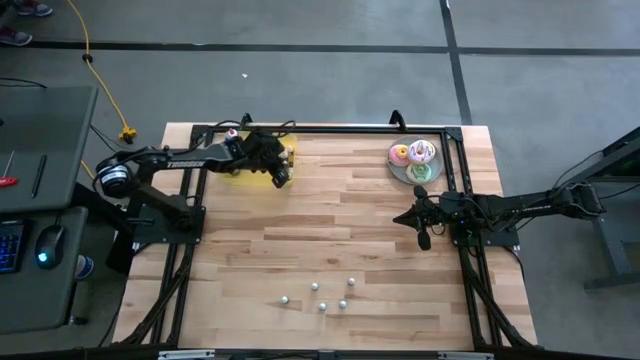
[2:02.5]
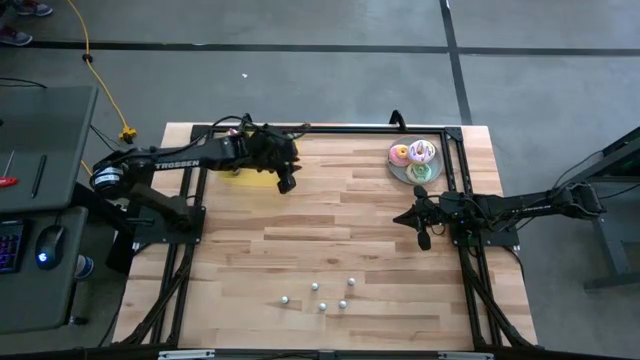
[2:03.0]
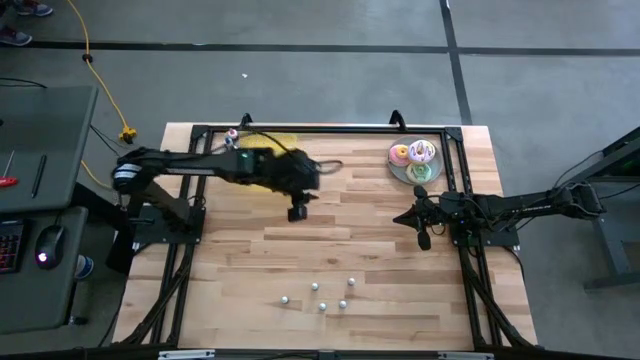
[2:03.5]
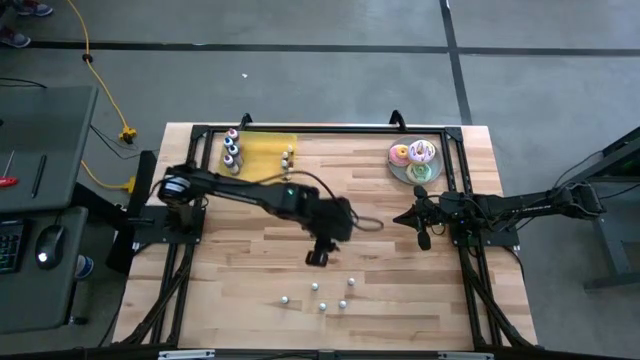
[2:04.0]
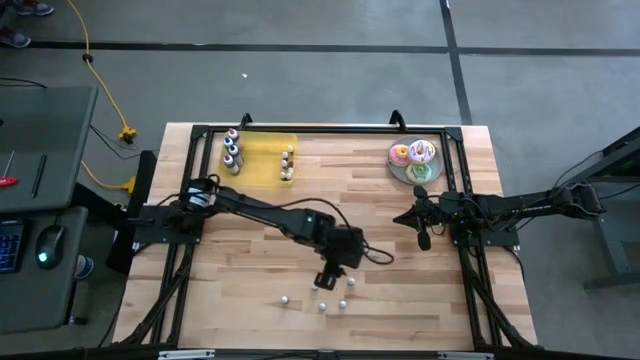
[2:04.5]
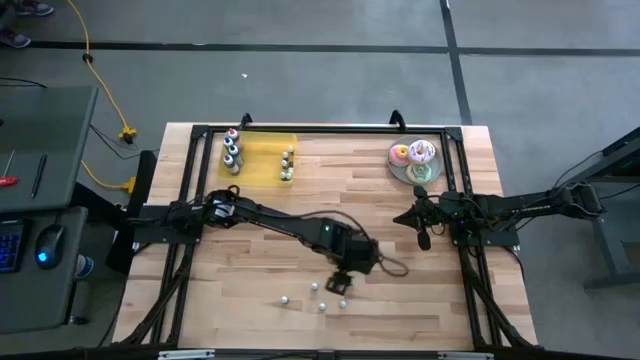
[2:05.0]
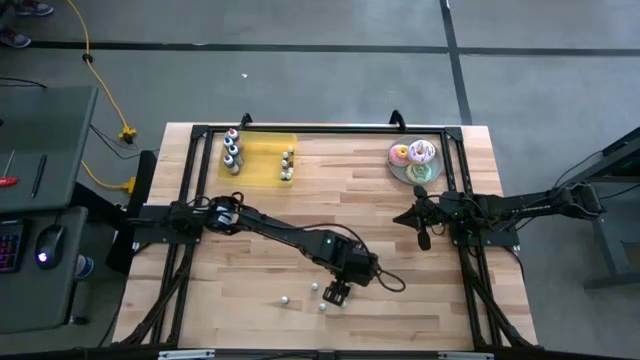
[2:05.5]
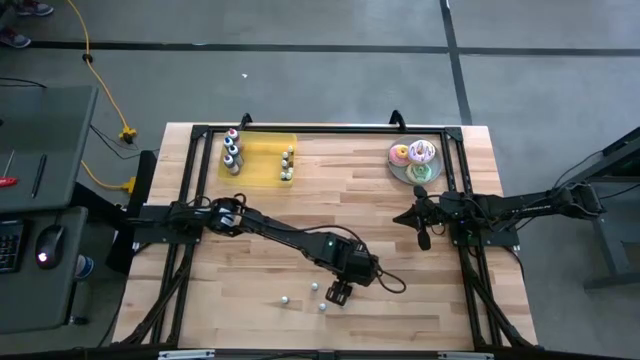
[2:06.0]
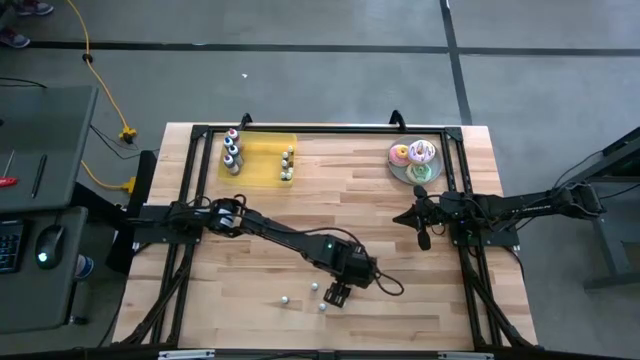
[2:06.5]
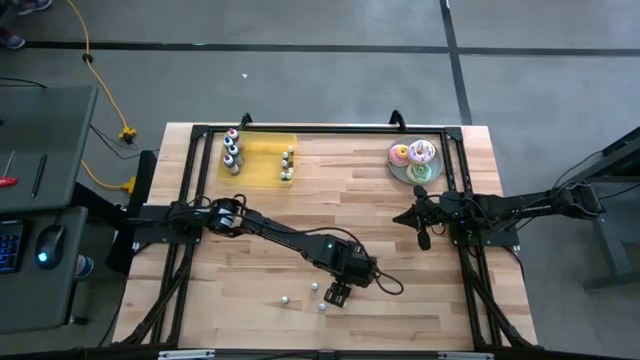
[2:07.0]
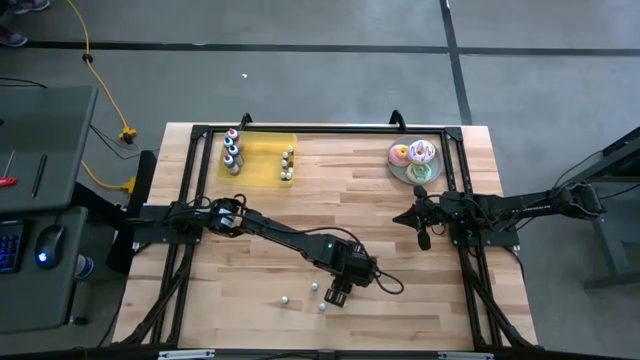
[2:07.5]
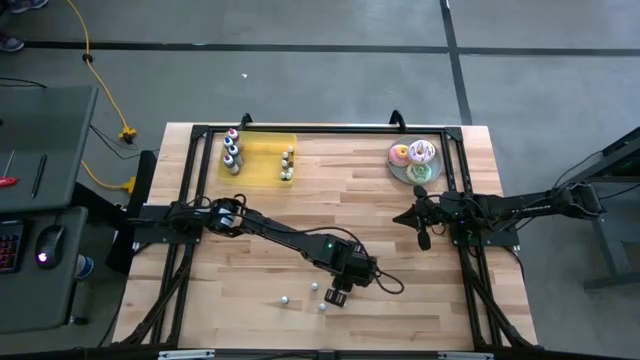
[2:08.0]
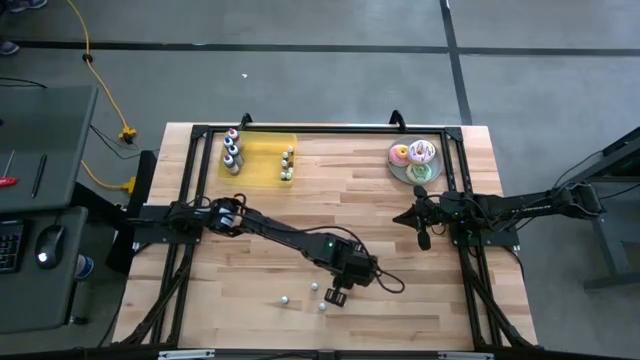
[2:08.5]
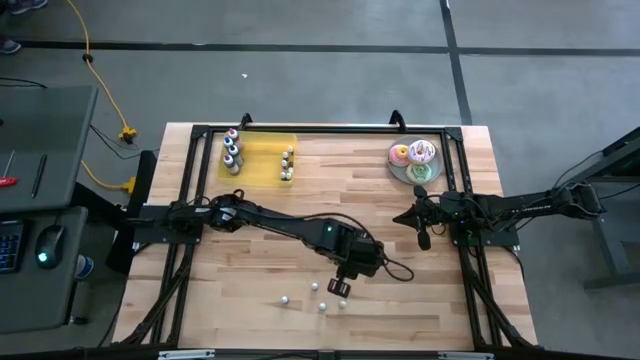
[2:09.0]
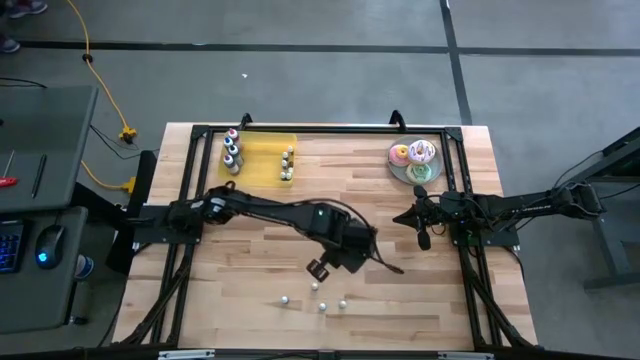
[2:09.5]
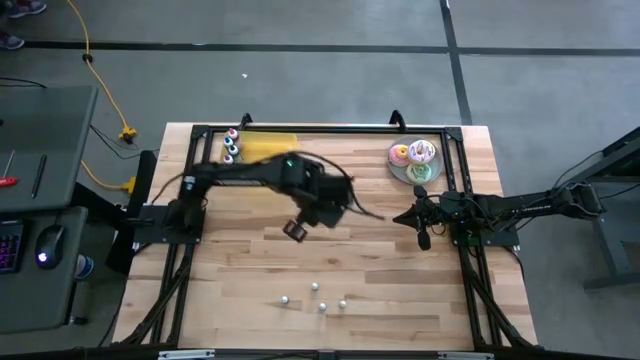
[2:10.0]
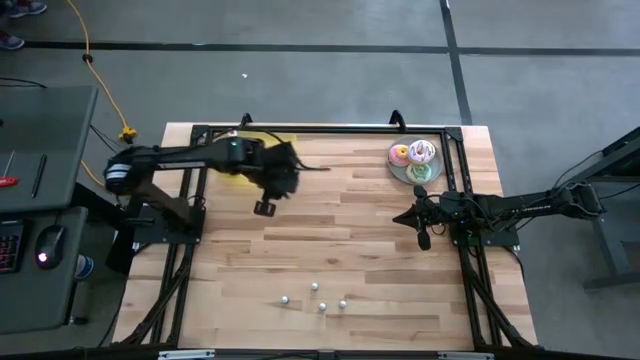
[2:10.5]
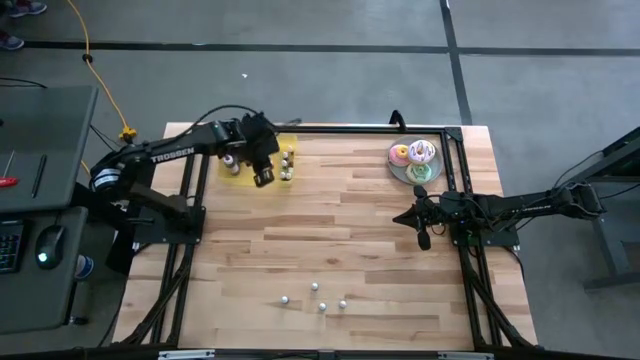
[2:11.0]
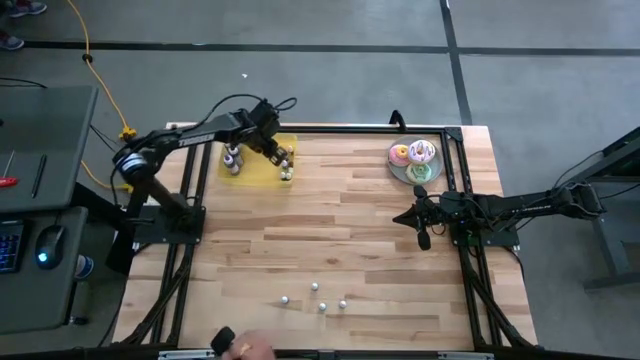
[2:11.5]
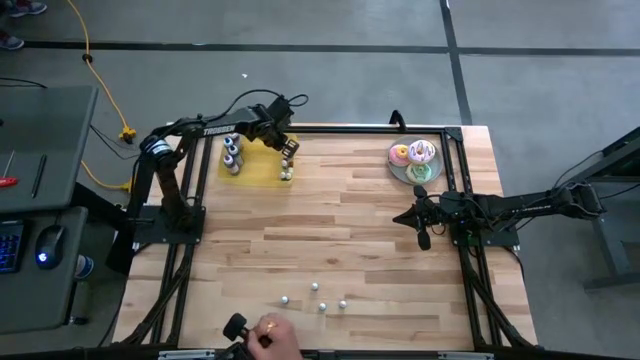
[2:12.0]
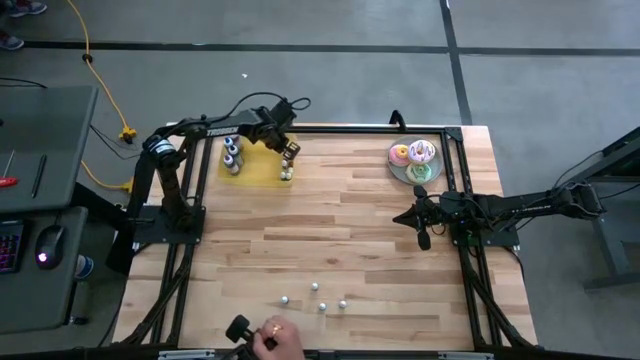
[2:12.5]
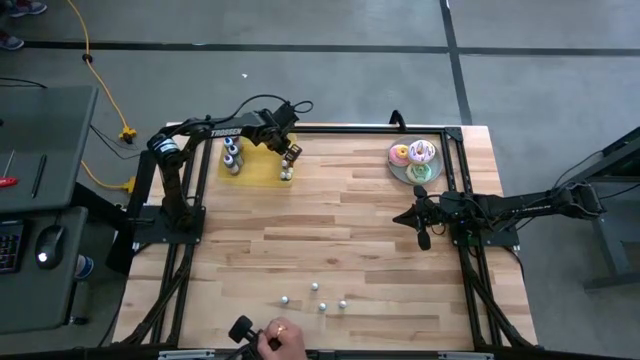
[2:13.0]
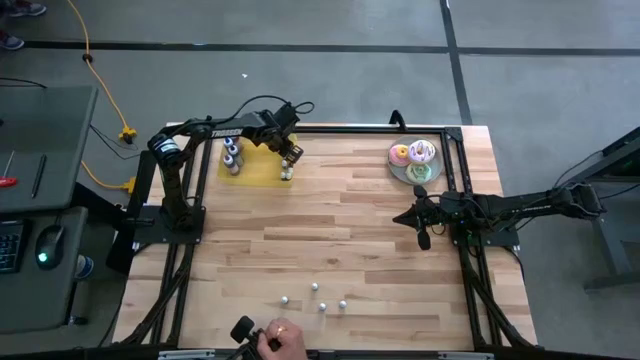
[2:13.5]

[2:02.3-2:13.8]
Task: Pick & Place food coloring
Put the small orange food coloring bottle into the yellow bin

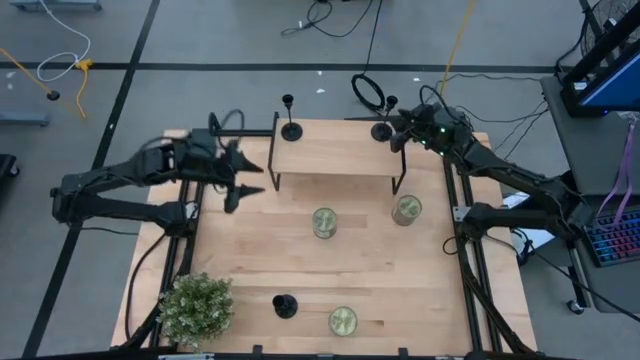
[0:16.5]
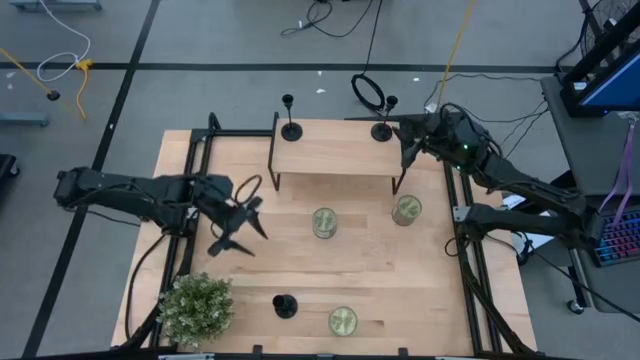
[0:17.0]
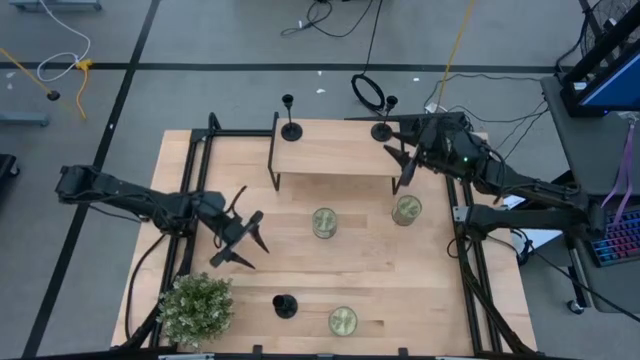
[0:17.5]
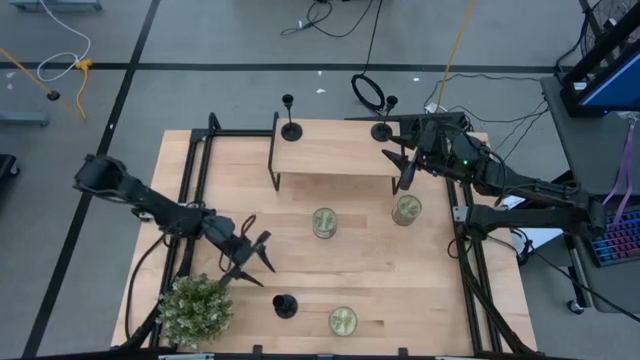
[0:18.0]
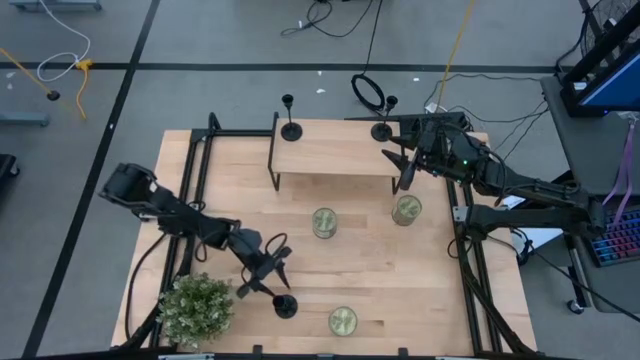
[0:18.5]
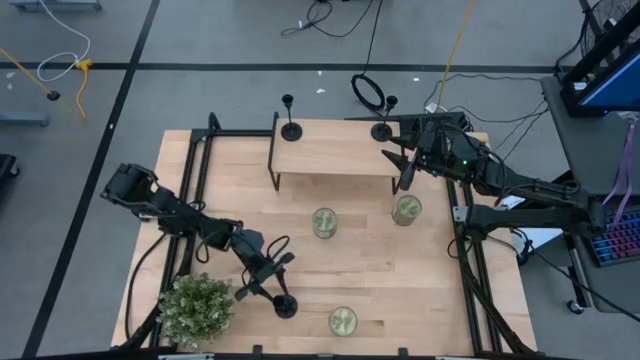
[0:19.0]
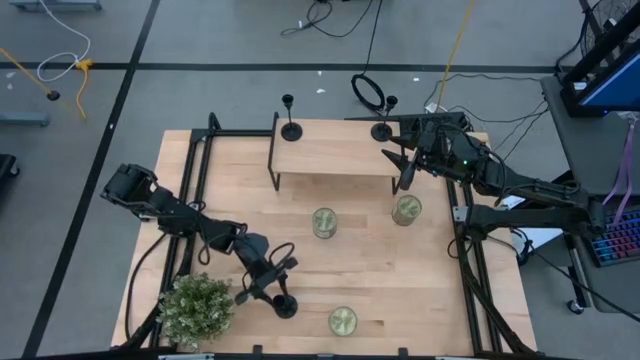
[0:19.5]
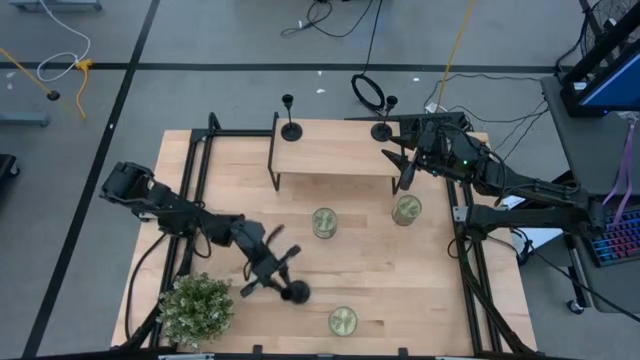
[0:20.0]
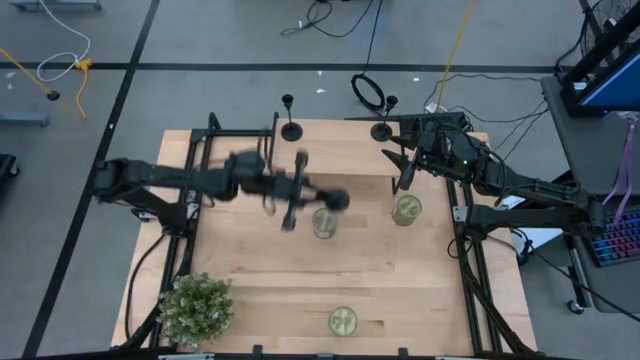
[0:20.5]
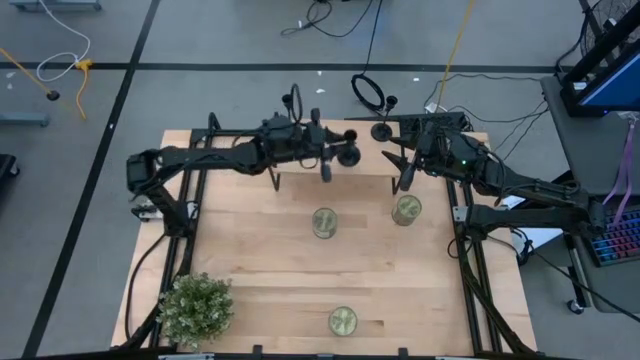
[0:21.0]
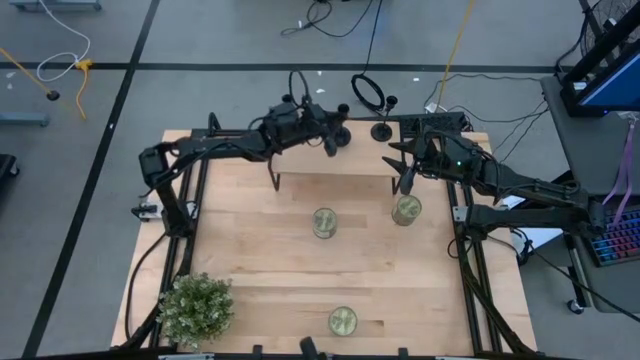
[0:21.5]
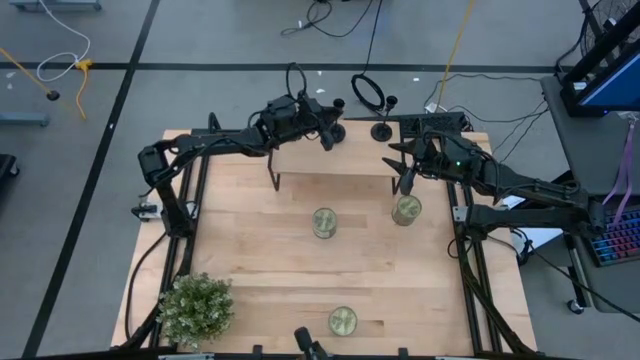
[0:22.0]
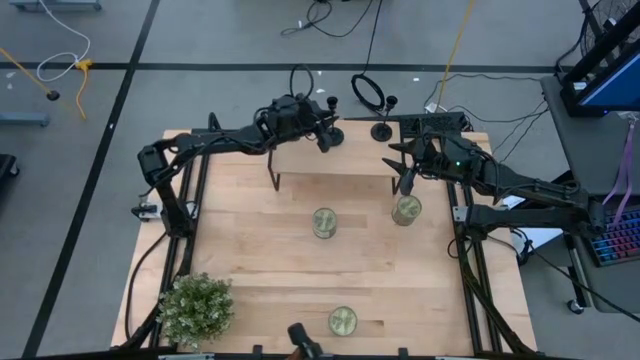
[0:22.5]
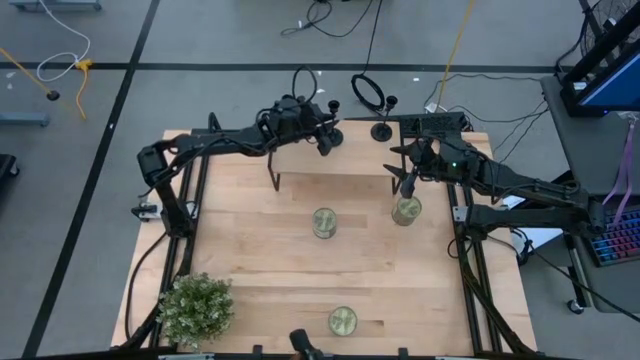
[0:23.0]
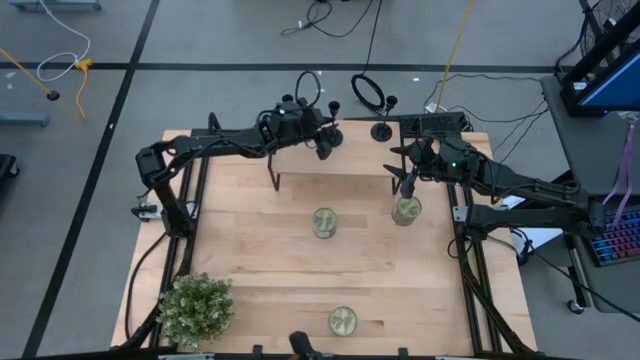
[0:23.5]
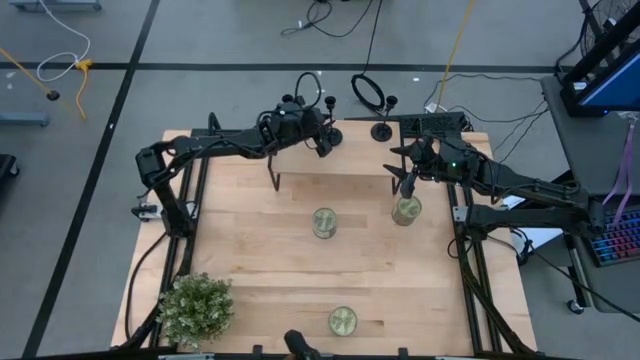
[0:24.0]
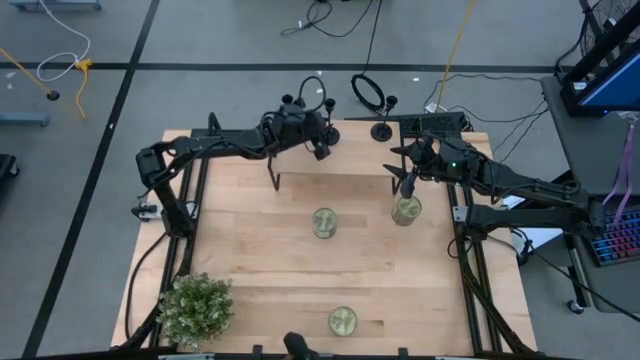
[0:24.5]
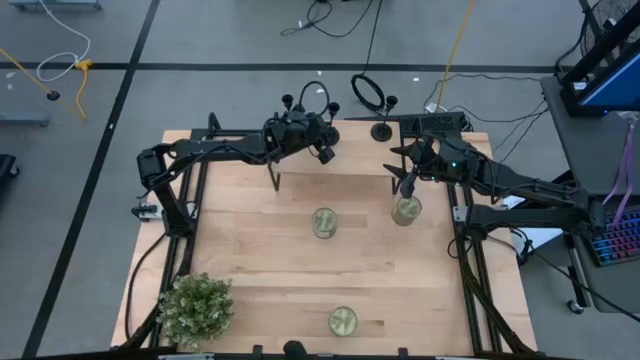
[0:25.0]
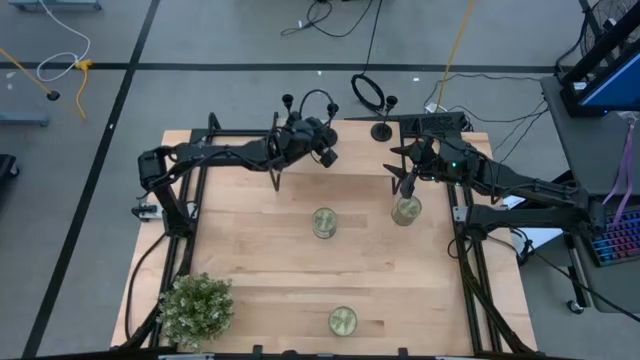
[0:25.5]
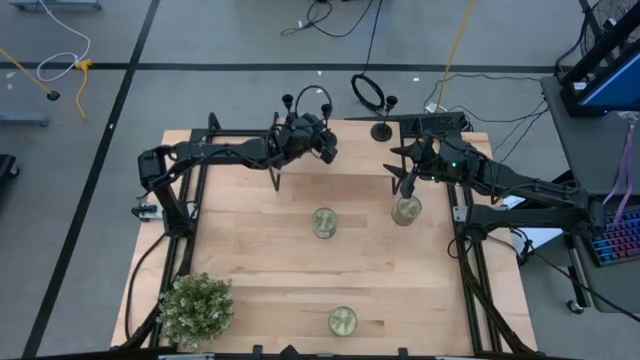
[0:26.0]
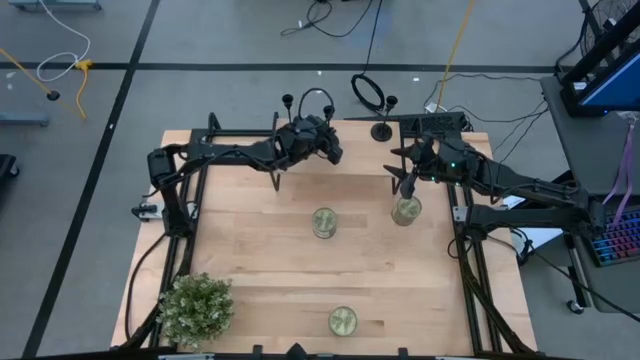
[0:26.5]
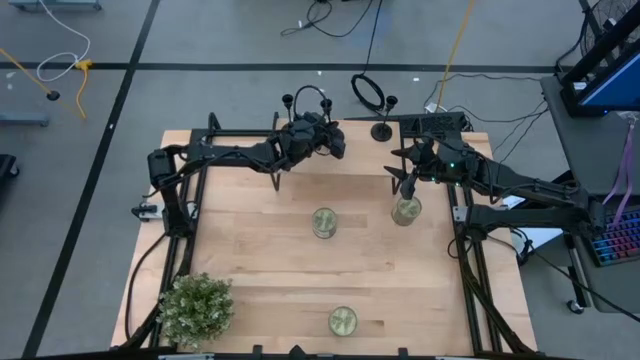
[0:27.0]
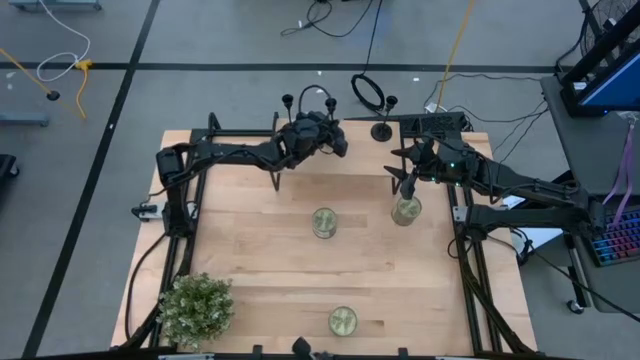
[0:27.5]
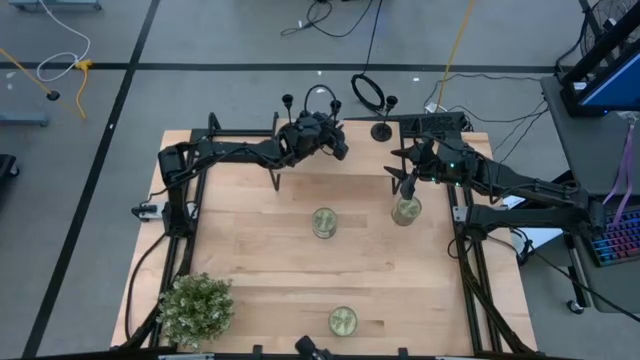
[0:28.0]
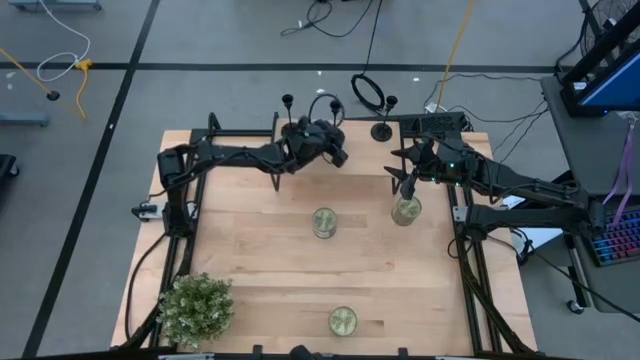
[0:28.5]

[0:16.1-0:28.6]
Task: Pick & Place candle stick holders
Put the black candle holder on the shelf
